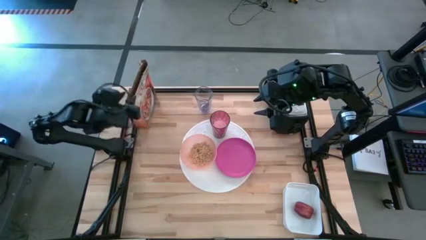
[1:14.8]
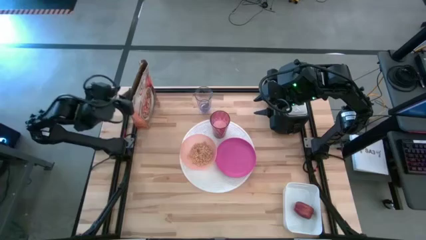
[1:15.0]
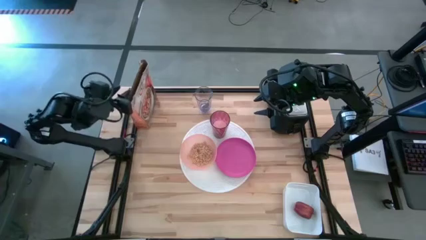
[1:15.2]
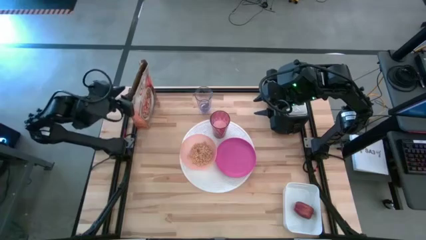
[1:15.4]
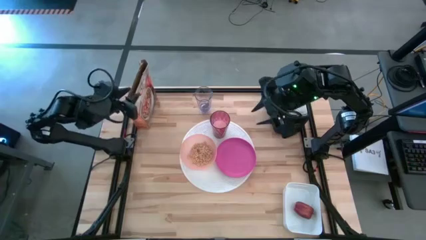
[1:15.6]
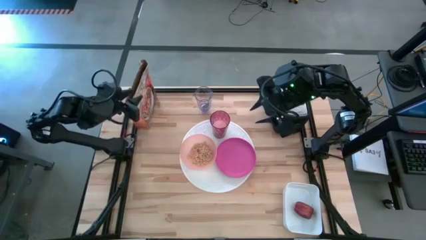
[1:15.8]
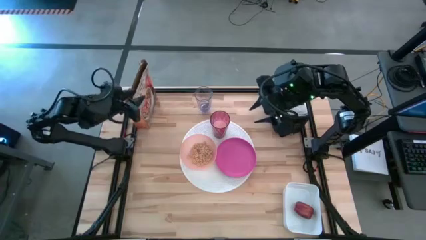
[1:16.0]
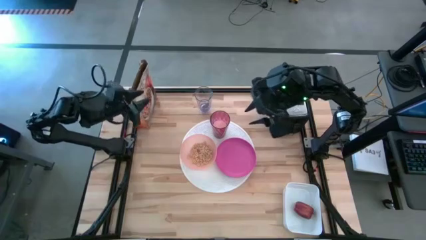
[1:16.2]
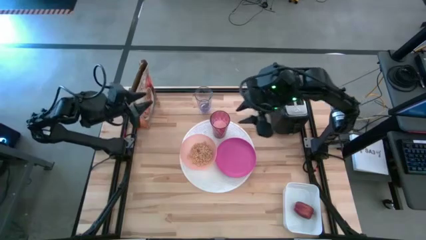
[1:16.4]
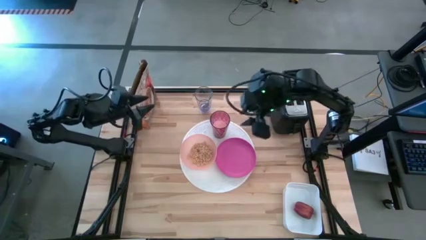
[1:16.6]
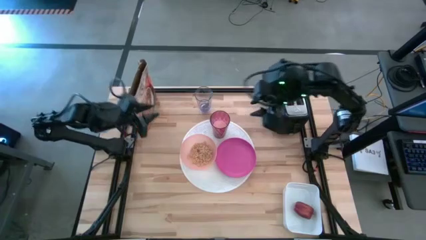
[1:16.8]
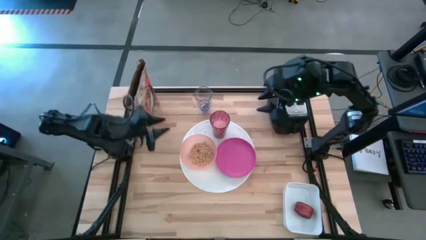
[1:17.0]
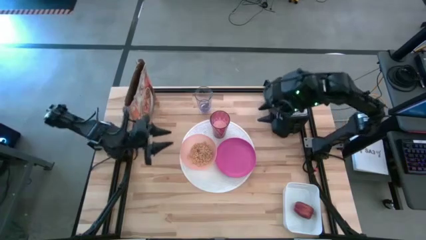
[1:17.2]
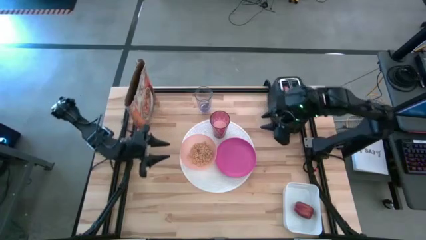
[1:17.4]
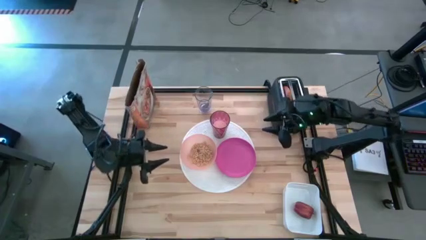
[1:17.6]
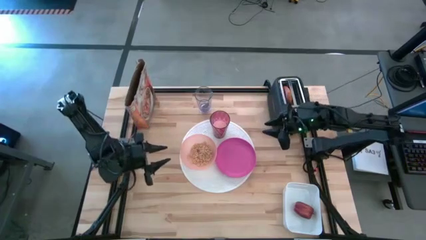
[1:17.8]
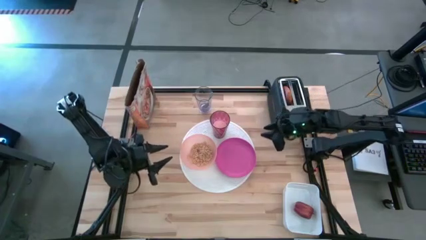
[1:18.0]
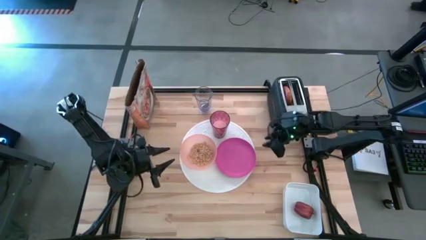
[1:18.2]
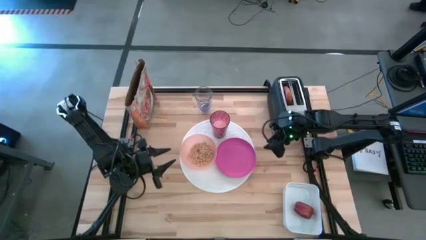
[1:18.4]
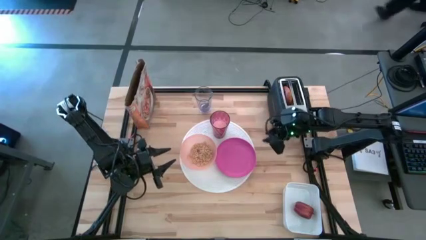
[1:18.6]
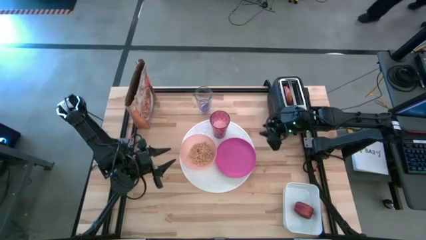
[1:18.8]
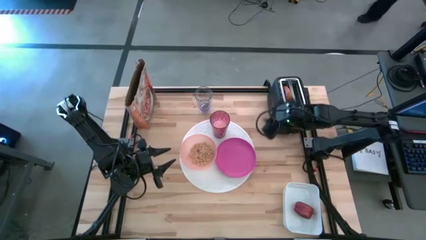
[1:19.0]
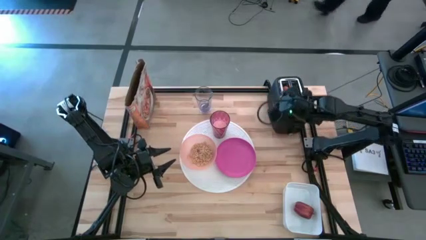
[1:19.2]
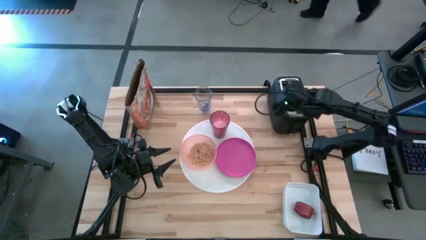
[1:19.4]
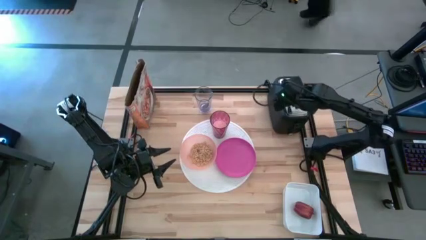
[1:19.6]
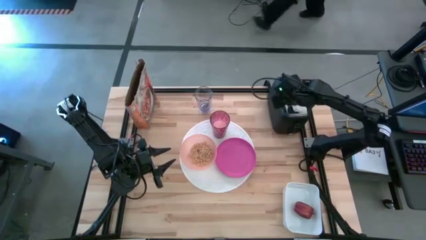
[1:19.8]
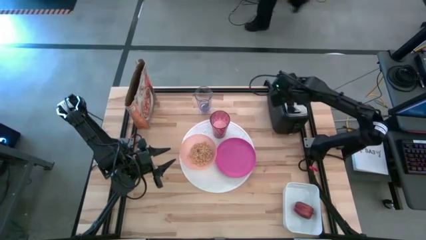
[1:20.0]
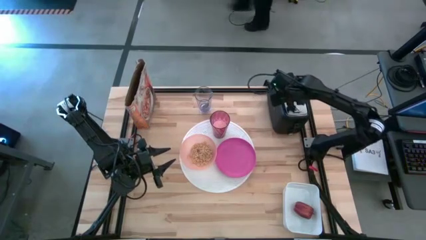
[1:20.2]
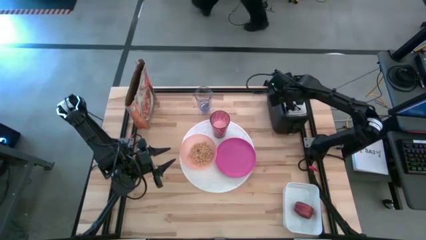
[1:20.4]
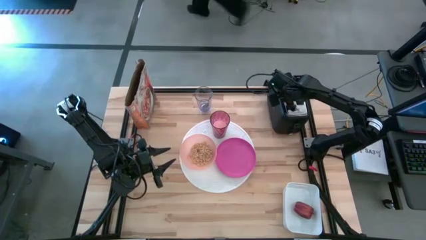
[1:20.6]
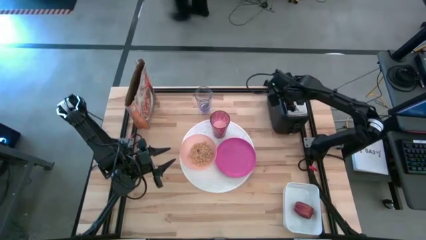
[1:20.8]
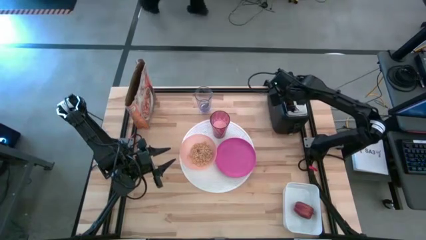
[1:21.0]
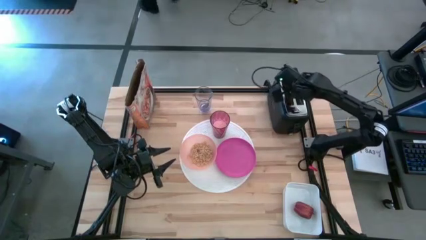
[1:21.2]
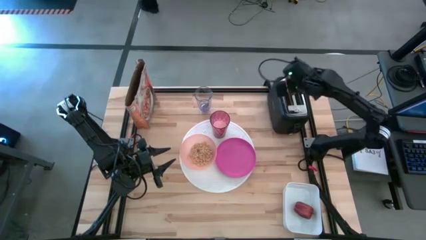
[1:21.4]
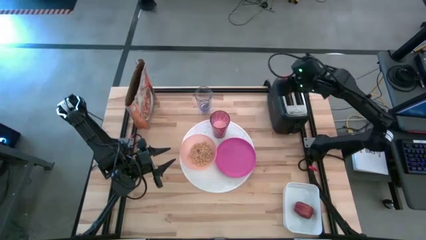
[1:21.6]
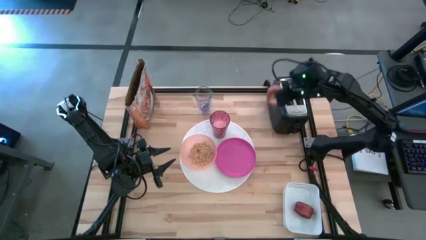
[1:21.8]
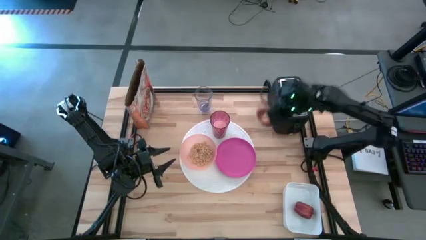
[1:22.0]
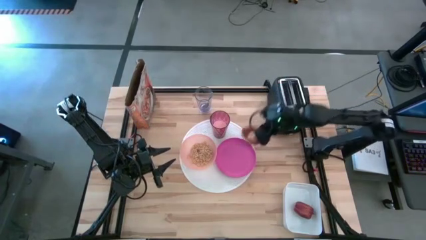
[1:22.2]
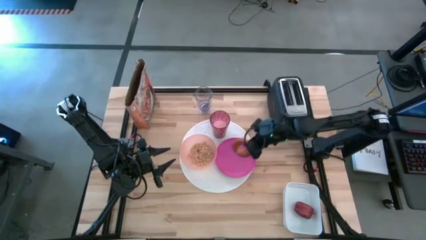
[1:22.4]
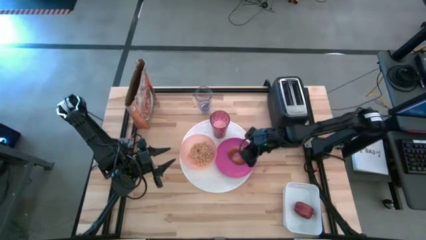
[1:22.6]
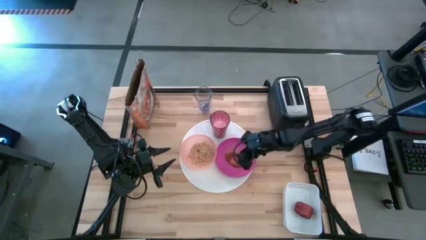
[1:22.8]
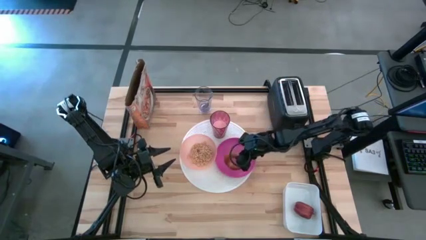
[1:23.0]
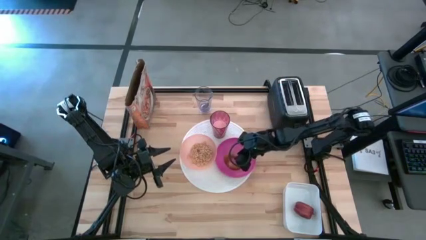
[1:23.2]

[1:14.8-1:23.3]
Task: Arrange a breakfast setting
Put the toasted bagel on the pink plate

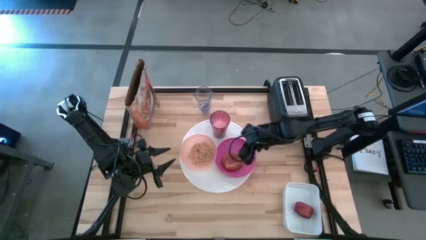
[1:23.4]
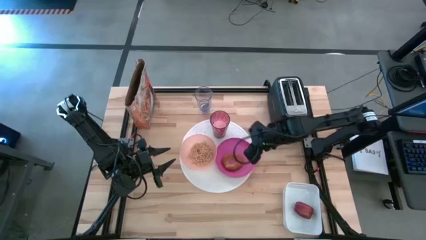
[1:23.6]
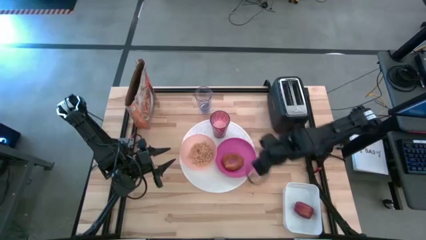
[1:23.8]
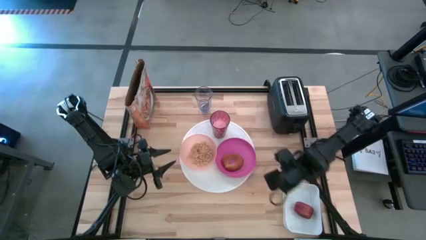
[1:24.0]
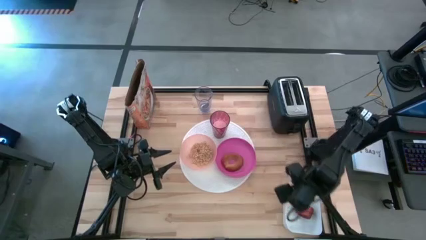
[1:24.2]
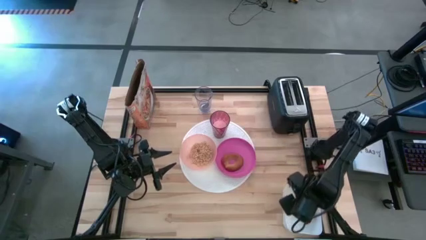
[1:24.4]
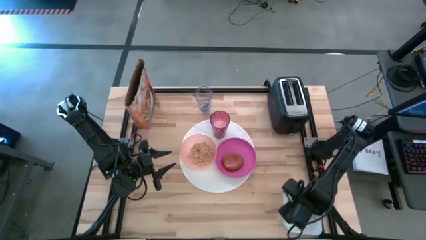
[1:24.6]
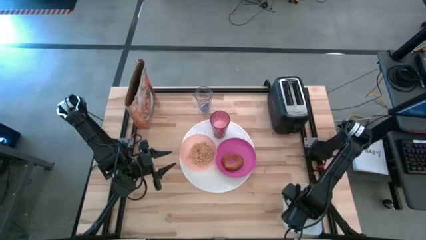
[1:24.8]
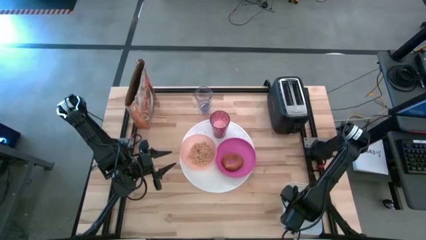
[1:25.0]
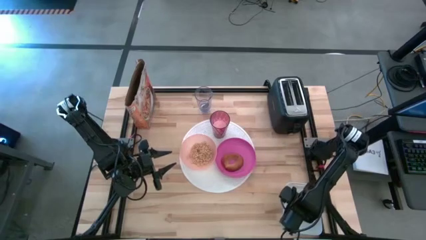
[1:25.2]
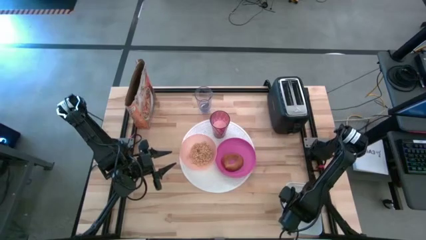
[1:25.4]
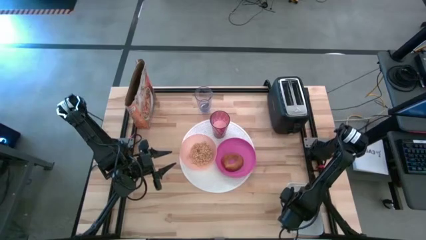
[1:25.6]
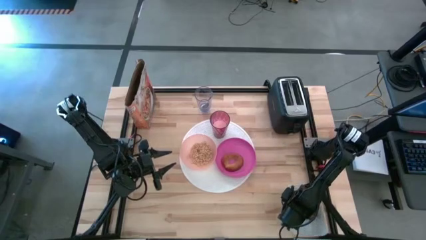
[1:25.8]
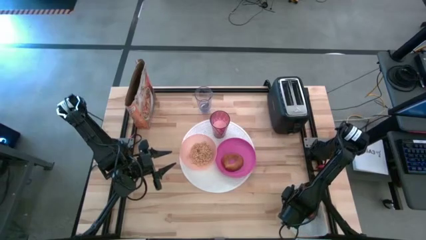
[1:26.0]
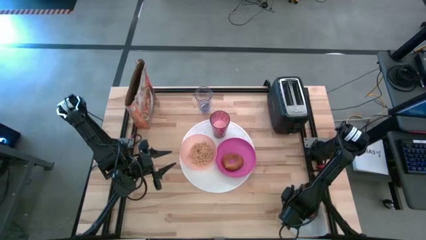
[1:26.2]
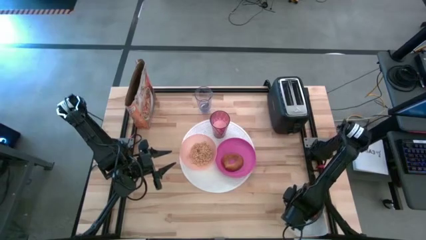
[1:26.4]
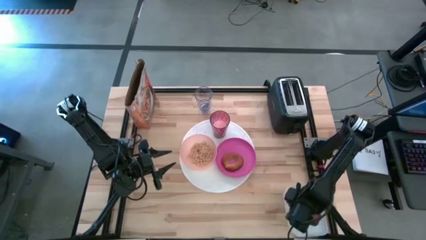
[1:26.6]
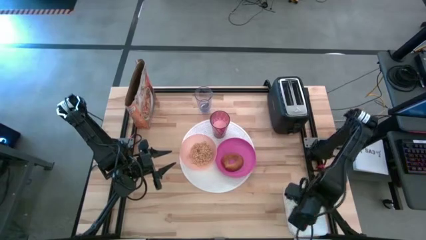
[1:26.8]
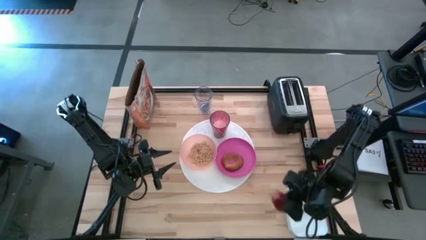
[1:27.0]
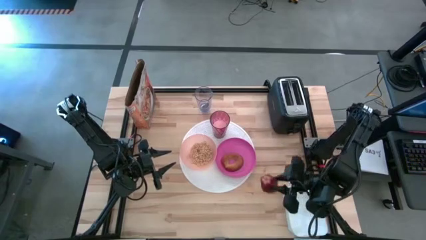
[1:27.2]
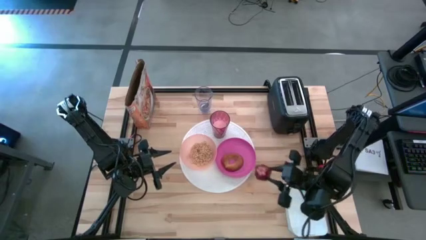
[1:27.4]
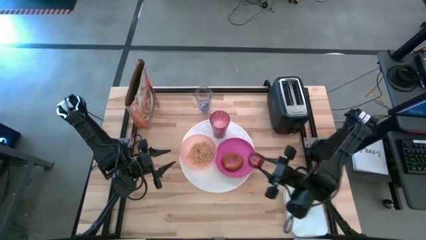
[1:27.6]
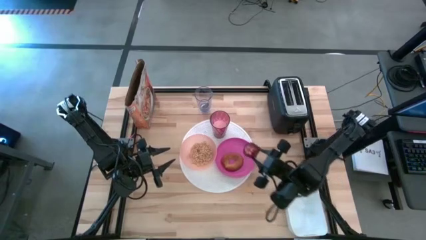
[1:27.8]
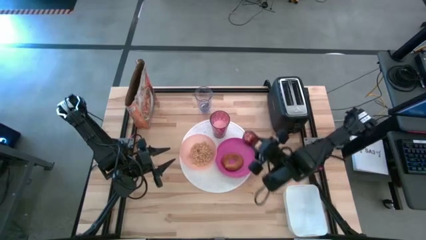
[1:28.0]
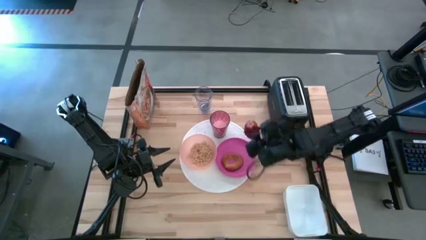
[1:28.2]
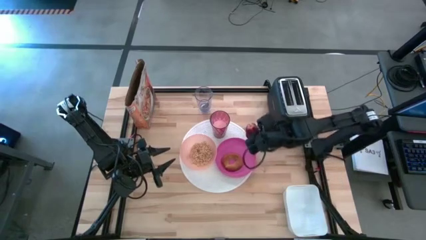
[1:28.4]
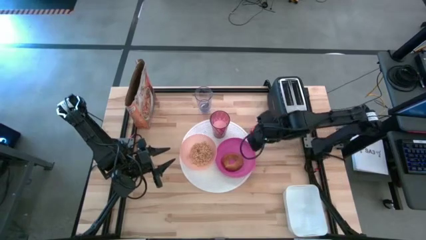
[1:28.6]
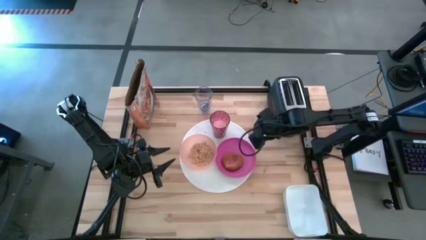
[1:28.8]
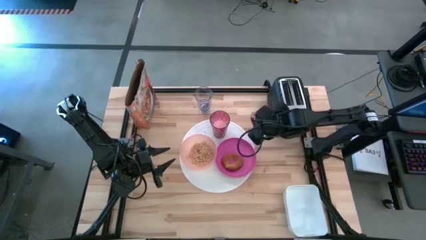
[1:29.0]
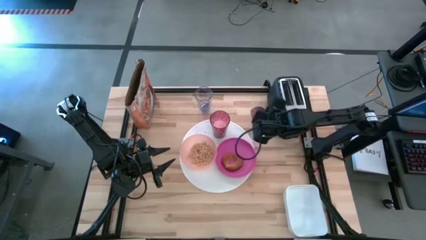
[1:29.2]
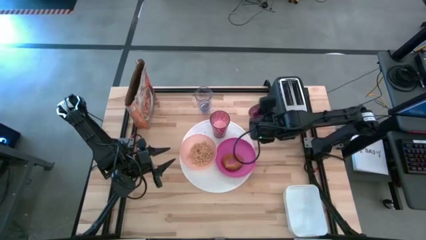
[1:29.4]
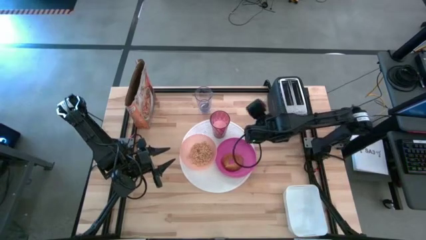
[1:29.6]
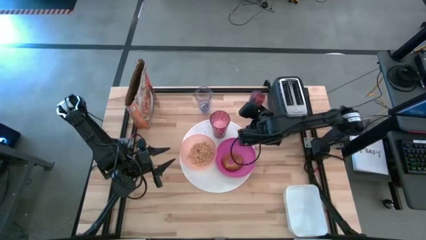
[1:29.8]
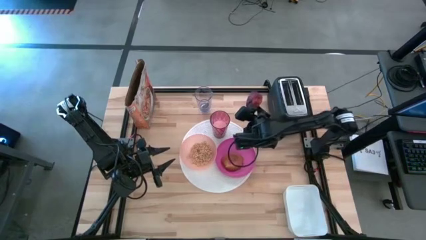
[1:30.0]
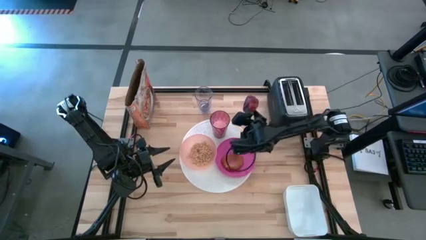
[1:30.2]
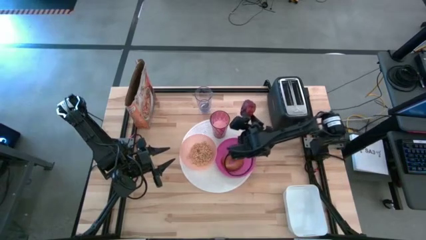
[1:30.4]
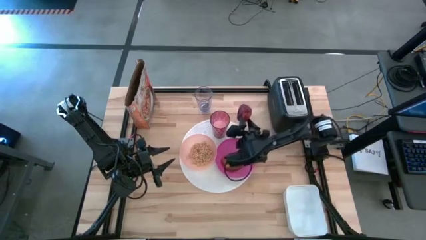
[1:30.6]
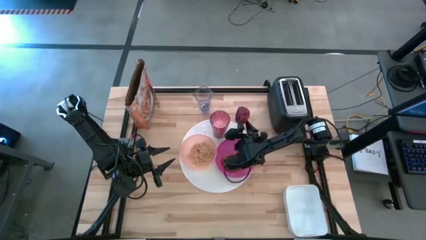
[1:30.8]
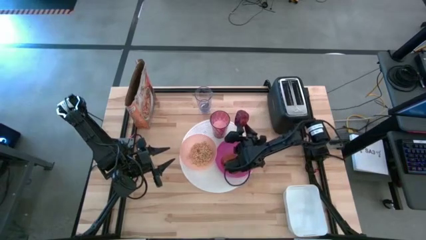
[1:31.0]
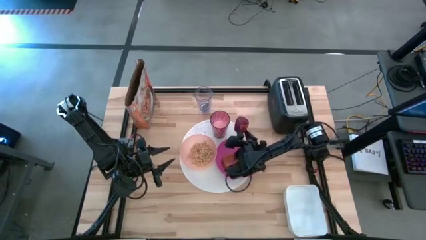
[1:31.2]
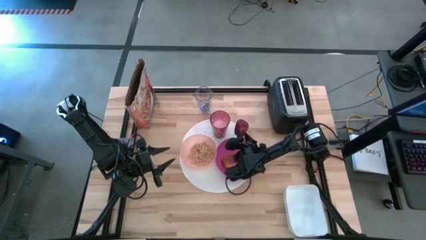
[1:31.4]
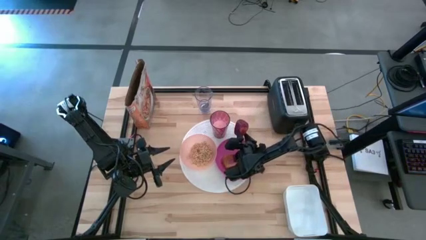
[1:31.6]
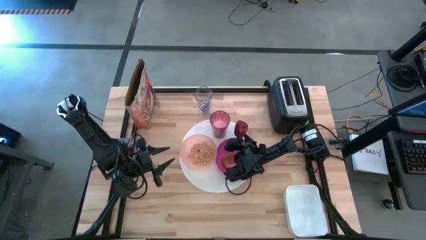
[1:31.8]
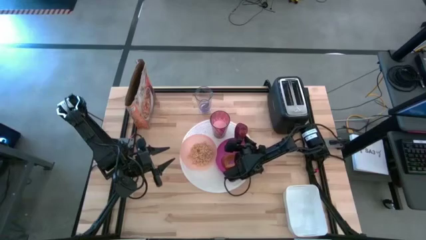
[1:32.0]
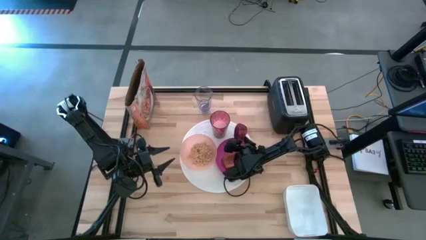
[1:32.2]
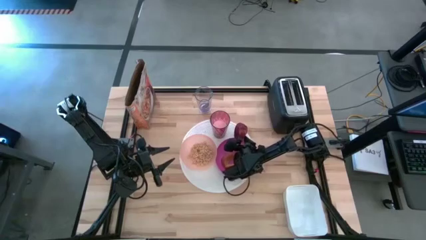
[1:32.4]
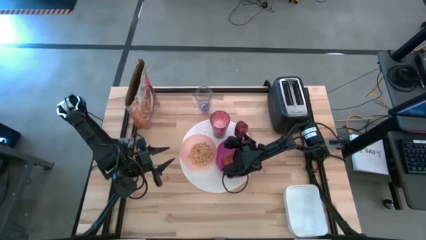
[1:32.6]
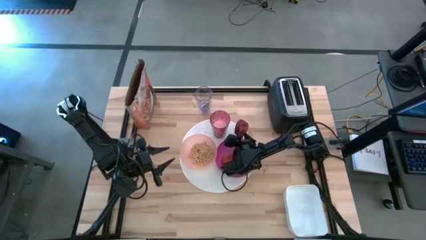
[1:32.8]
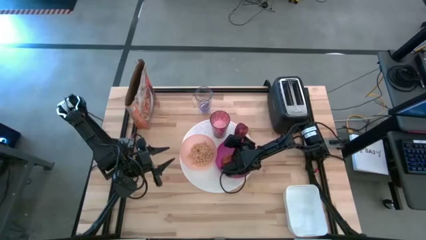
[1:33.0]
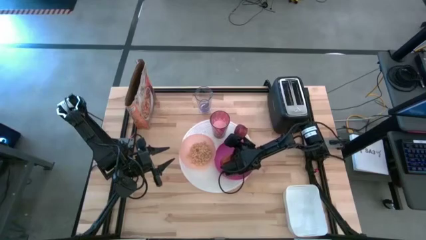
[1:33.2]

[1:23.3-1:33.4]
Put the red apple on the white table mat to the right of the red cup
